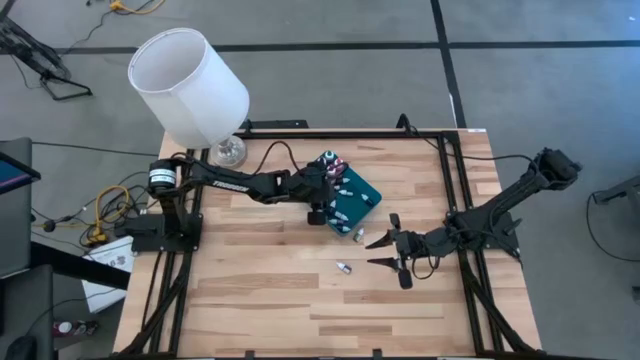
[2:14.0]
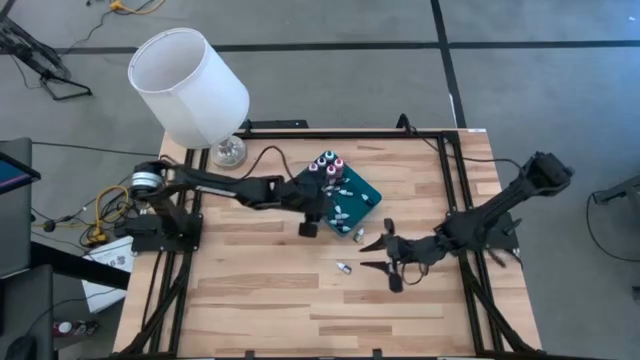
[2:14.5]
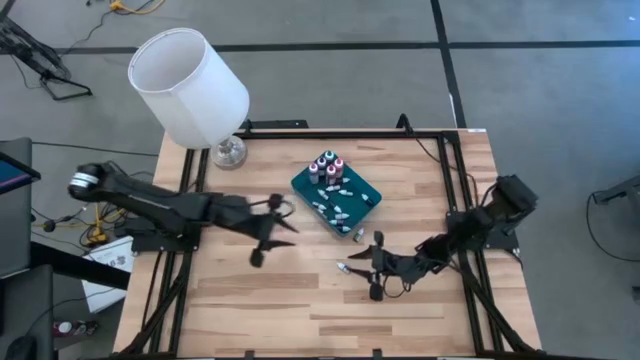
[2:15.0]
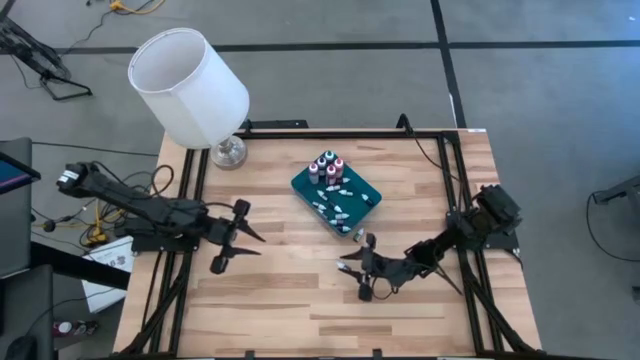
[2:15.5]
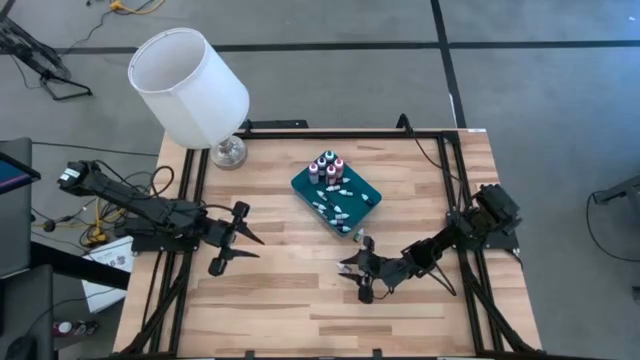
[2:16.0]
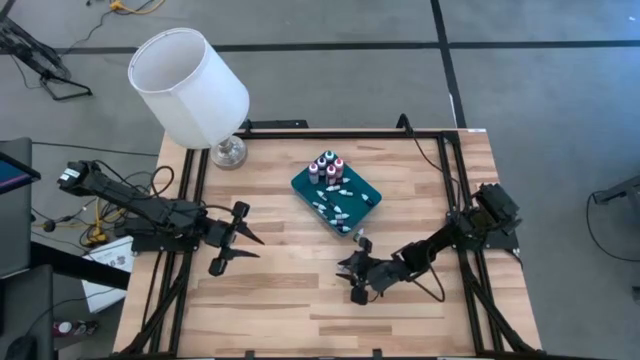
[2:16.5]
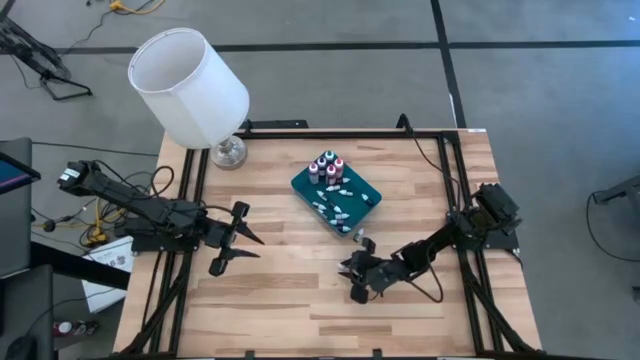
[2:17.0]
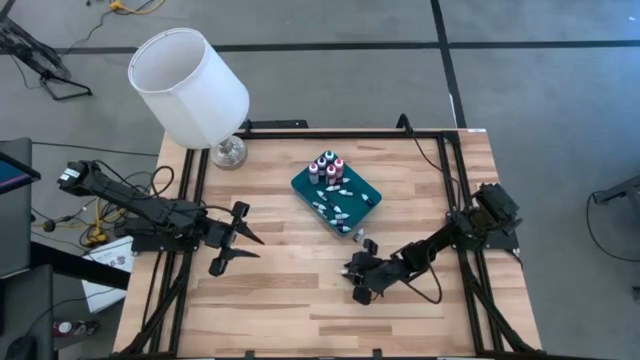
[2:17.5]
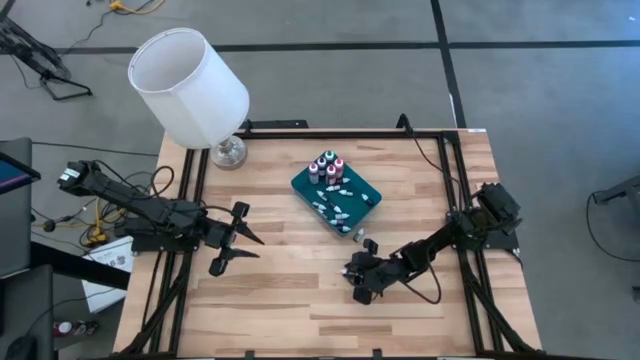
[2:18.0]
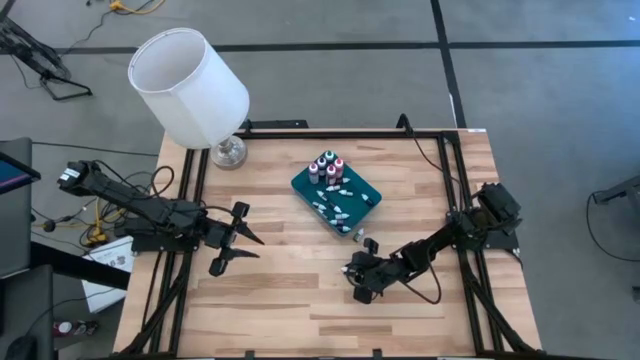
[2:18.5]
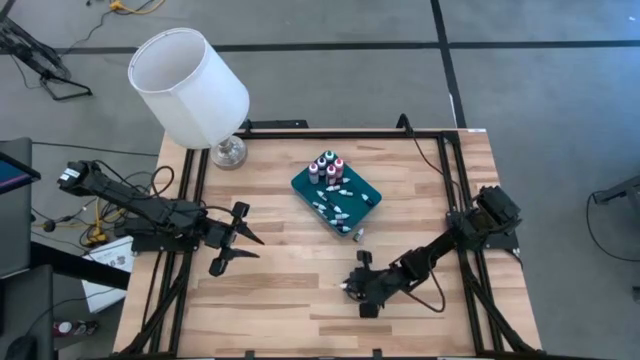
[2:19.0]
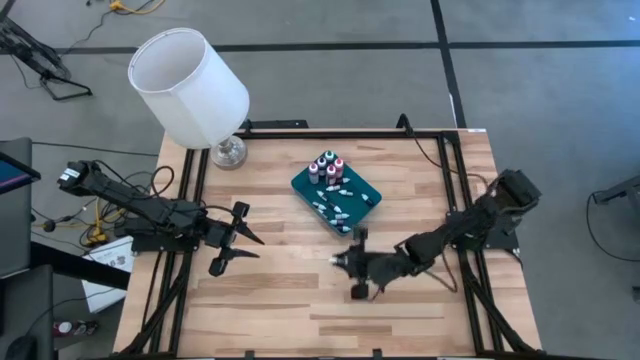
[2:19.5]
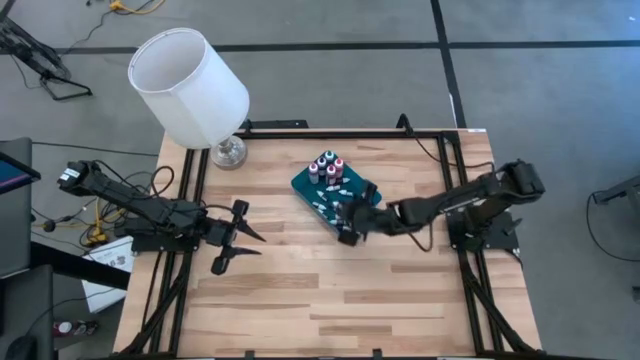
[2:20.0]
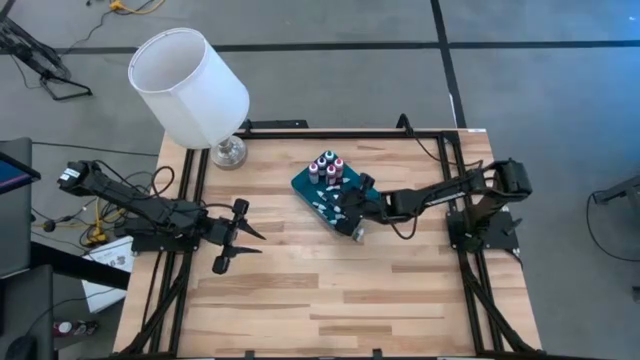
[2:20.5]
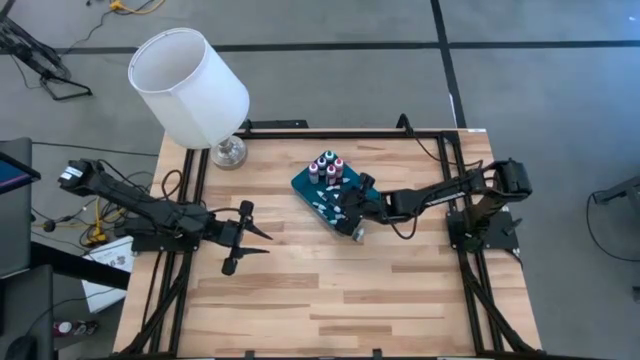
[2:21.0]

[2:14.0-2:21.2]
Task: Pick & Place food coloring
Put the small orange food coloring bottle into the blue bin

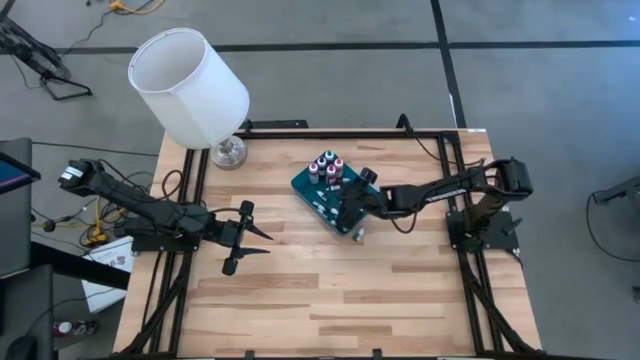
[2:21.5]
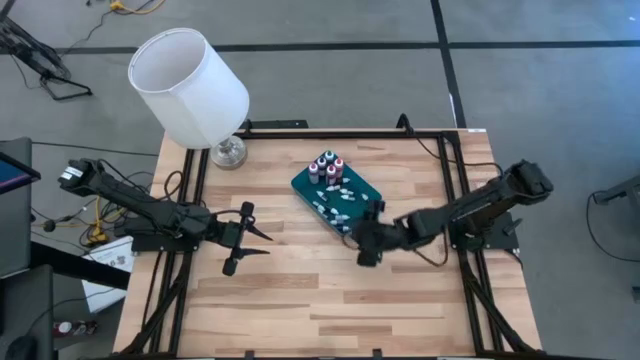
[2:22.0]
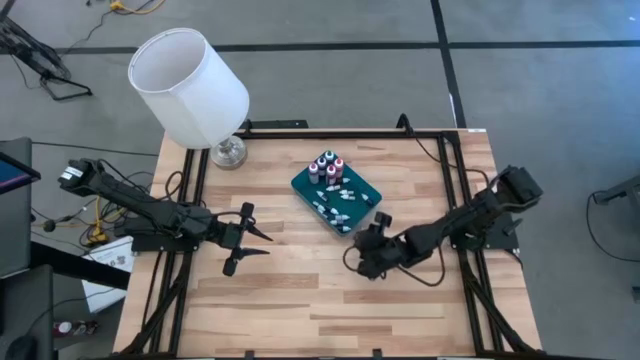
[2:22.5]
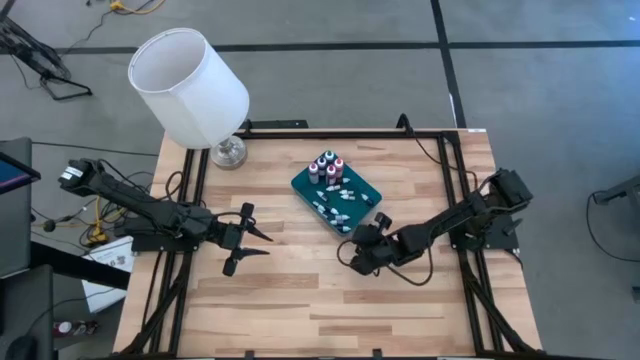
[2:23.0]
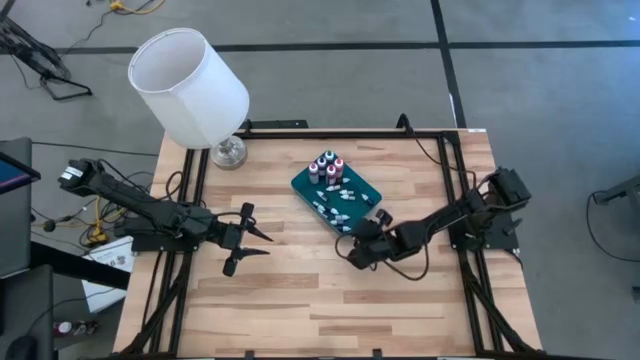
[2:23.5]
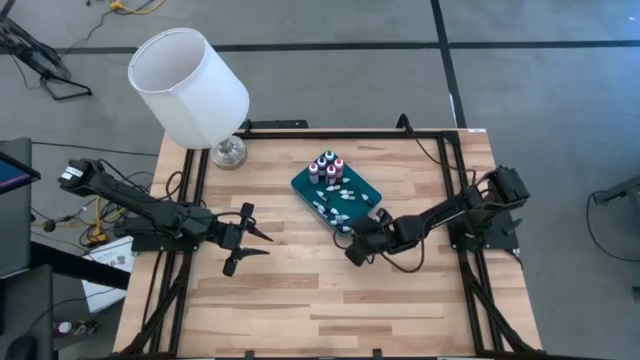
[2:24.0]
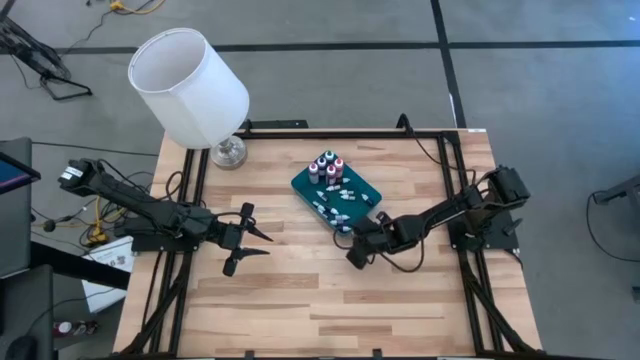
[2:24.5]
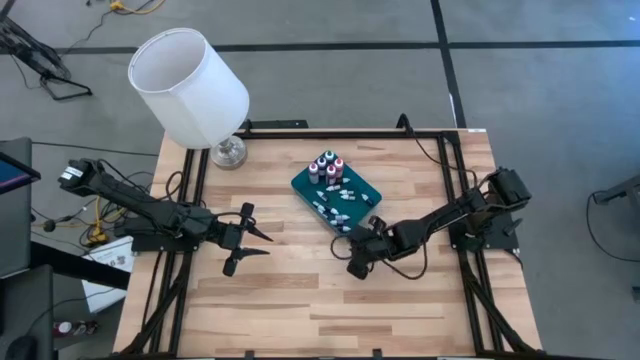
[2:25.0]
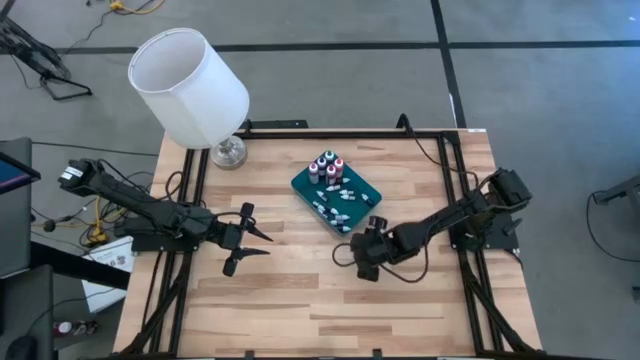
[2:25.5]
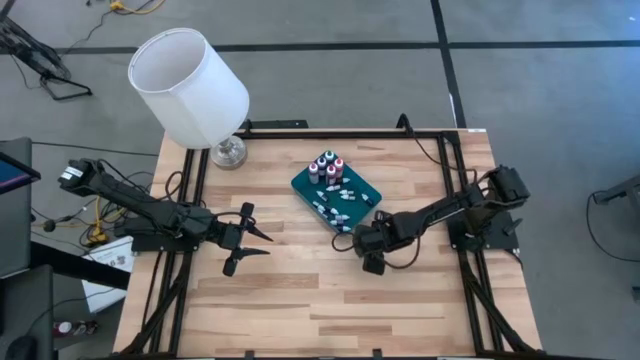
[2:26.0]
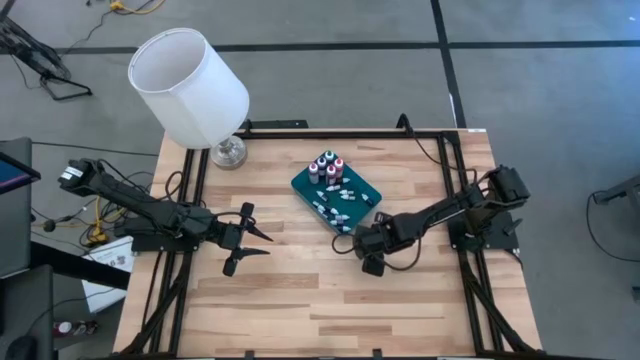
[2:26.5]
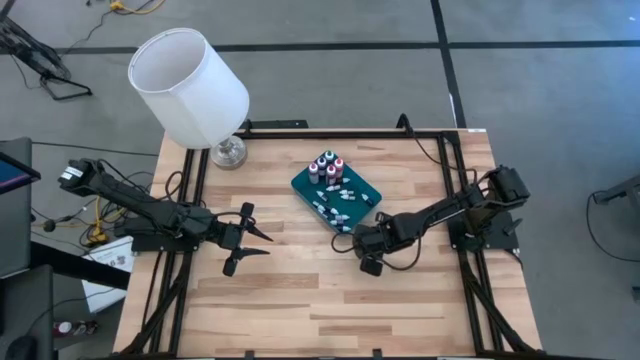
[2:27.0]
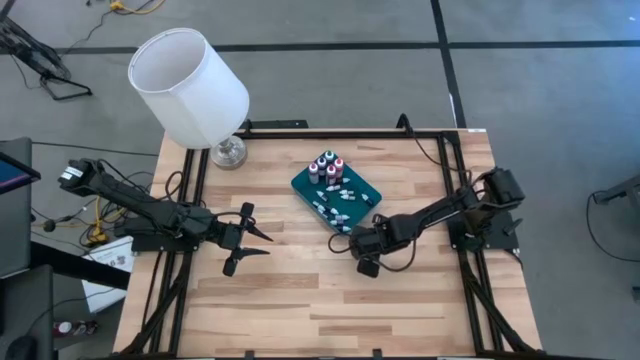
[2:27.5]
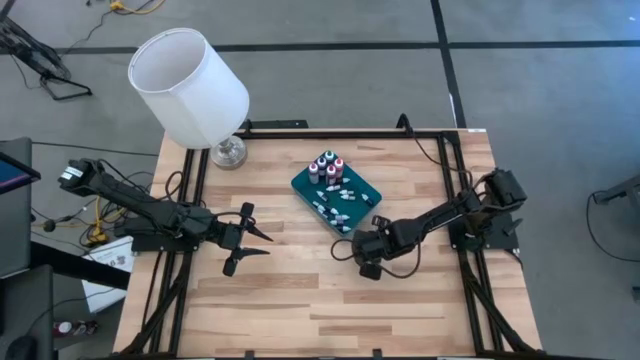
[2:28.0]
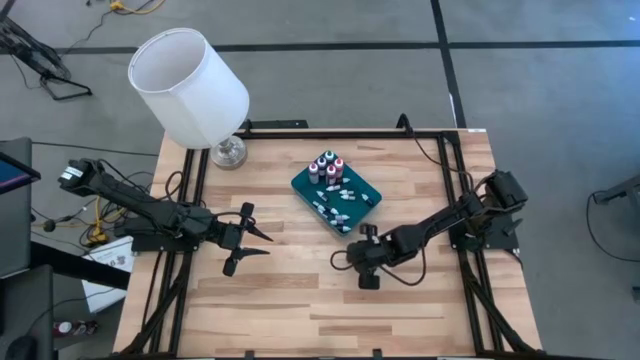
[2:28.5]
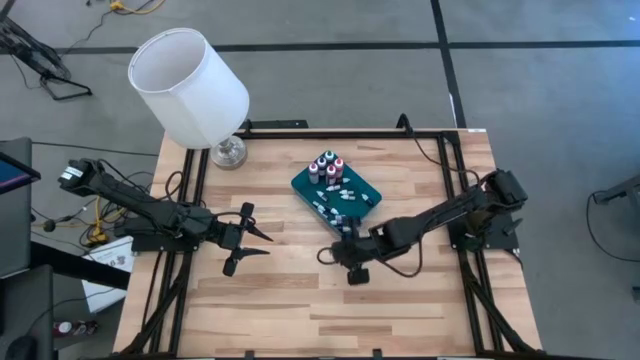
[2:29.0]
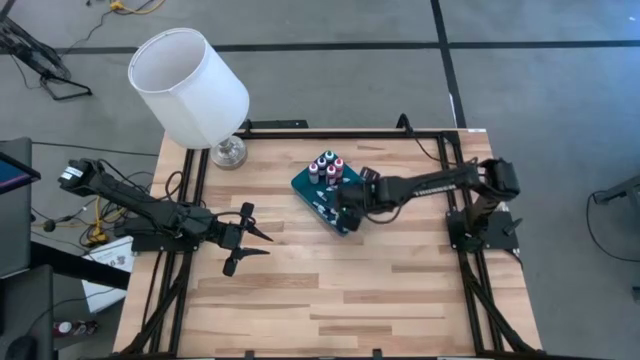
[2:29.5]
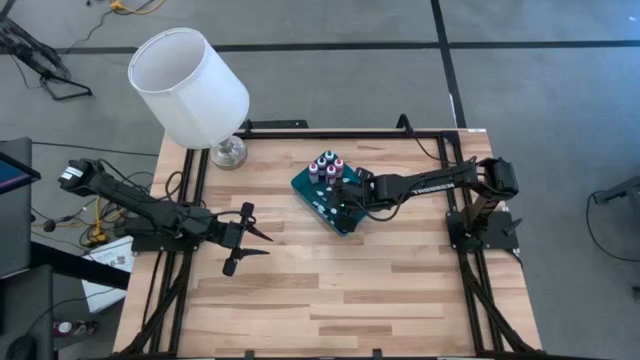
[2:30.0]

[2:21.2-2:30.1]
Put the small green food coloring bottle into the blue bin

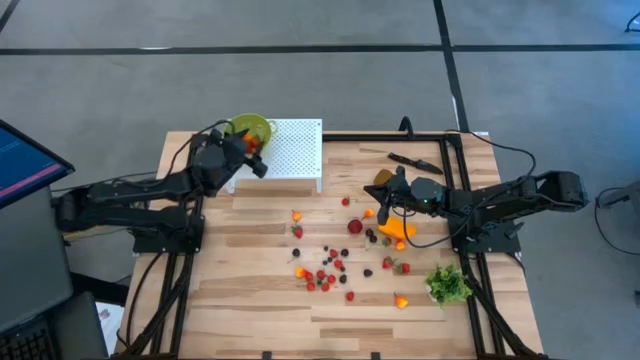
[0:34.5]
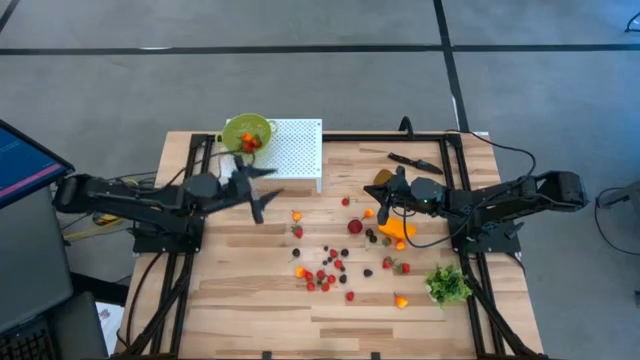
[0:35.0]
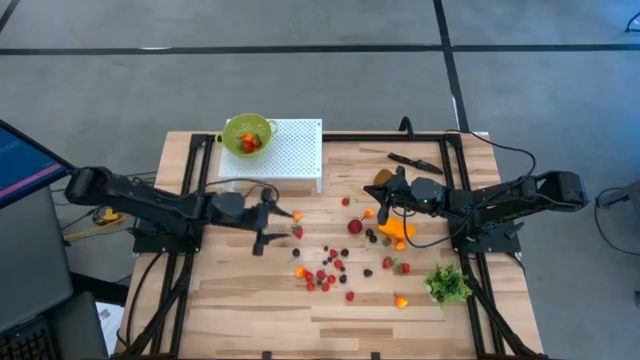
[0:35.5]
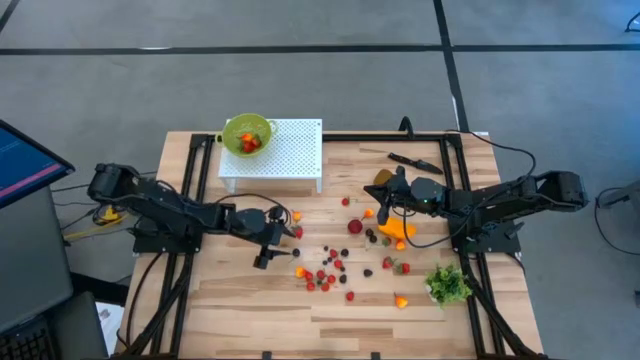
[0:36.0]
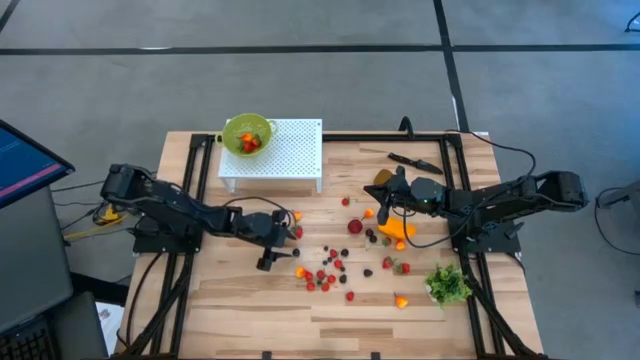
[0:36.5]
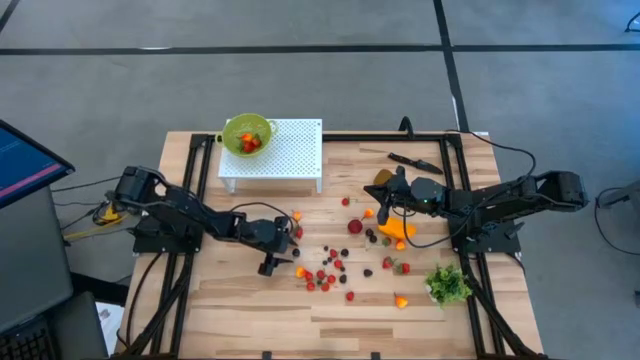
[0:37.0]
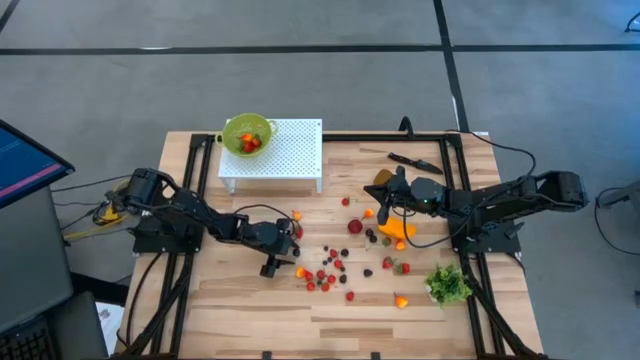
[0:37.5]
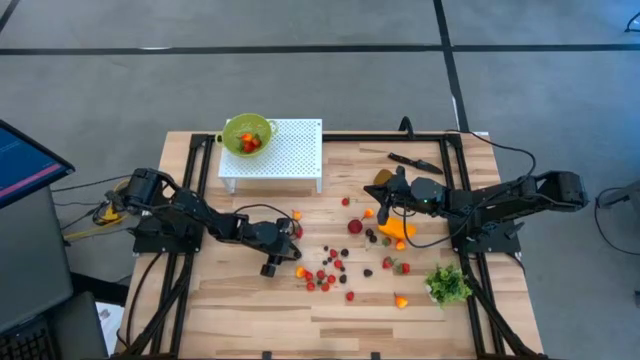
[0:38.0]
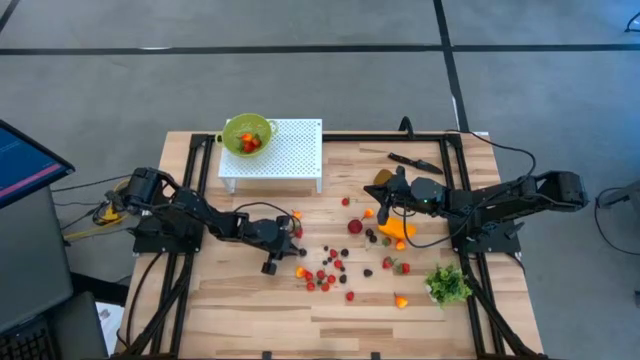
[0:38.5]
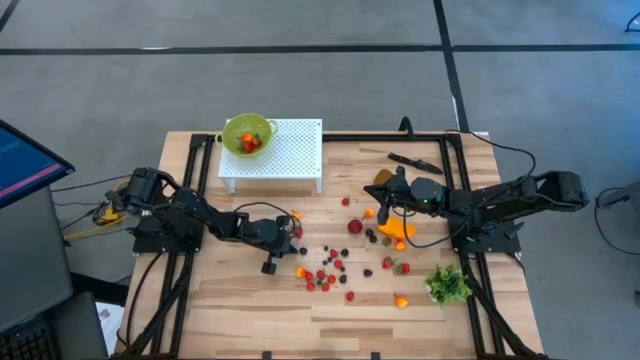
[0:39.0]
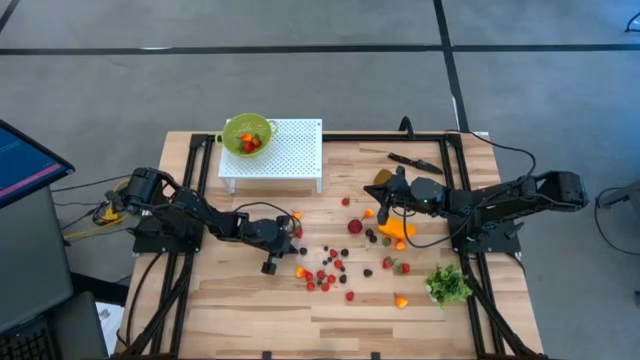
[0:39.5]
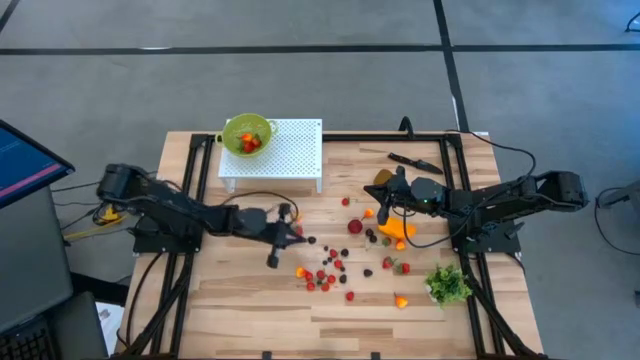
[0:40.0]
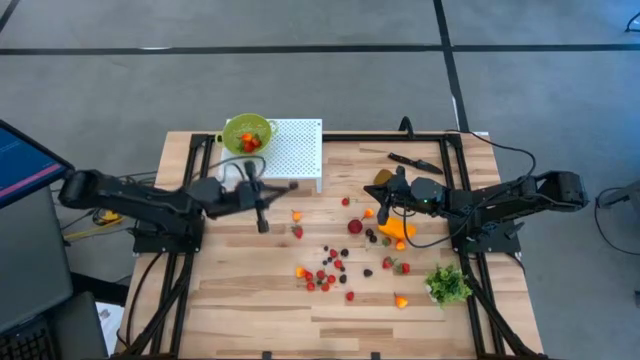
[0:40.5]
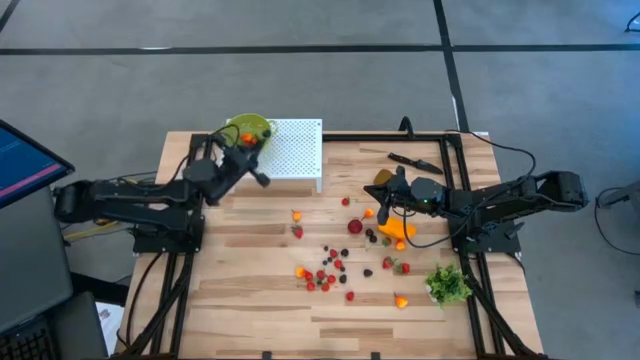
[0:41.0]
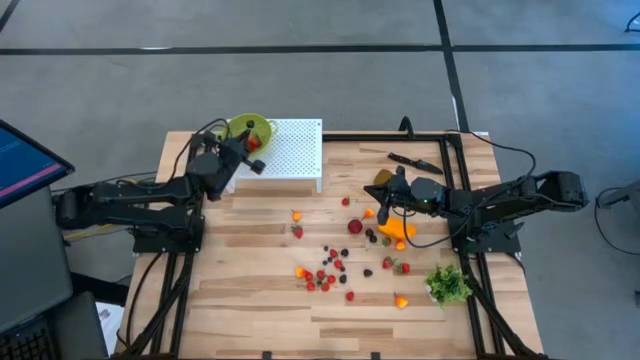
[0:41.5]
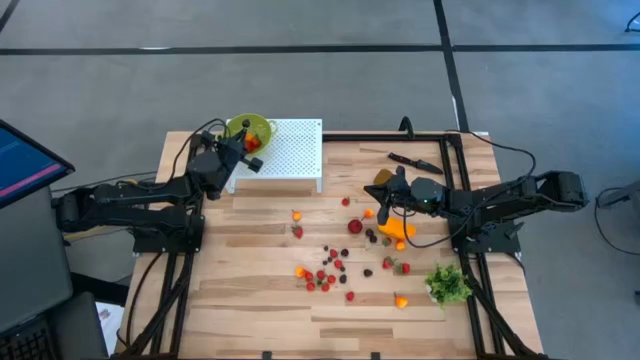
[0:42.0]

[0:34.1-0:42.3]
Task: Pick & Place Fruit
Put the black cherry into the green strainer bowl on the shelf
